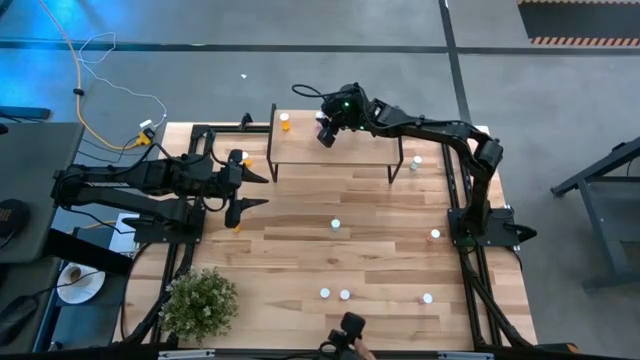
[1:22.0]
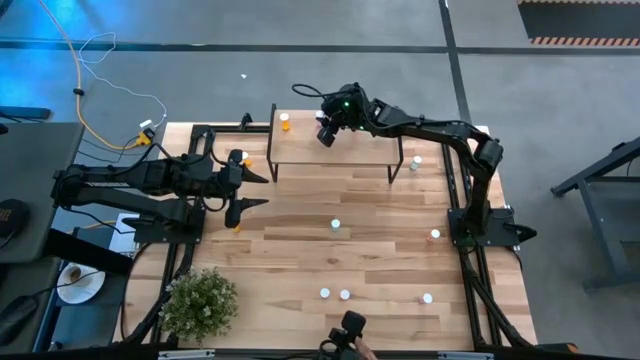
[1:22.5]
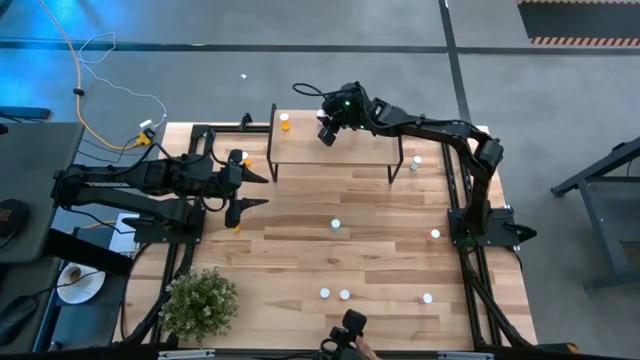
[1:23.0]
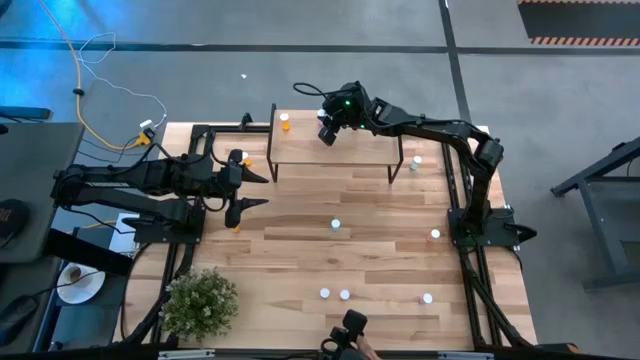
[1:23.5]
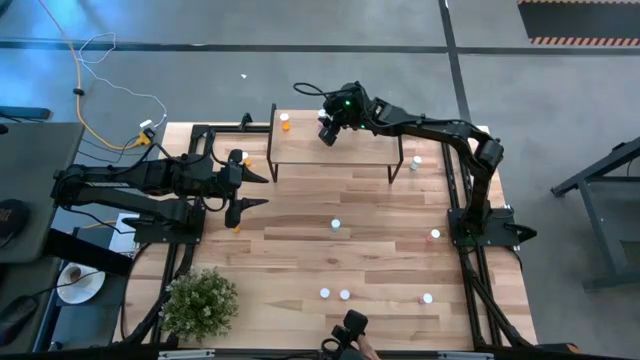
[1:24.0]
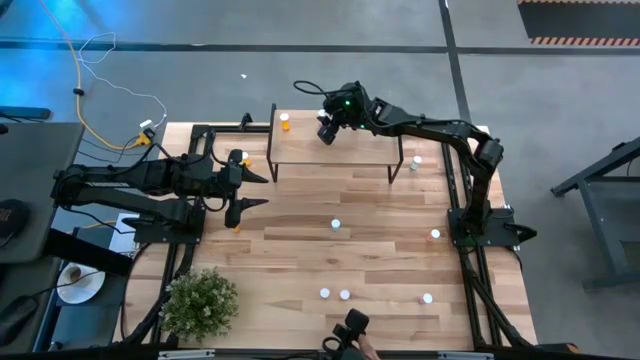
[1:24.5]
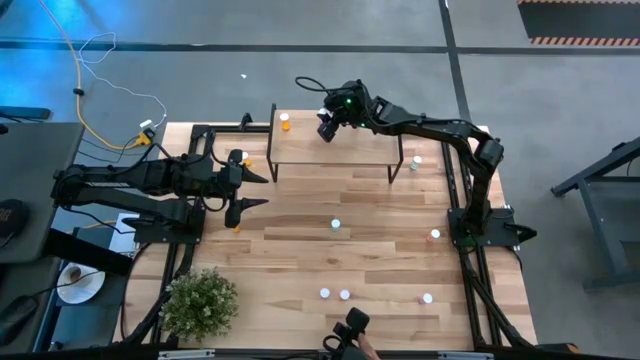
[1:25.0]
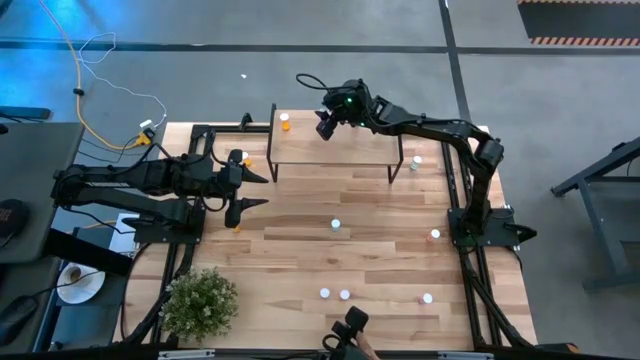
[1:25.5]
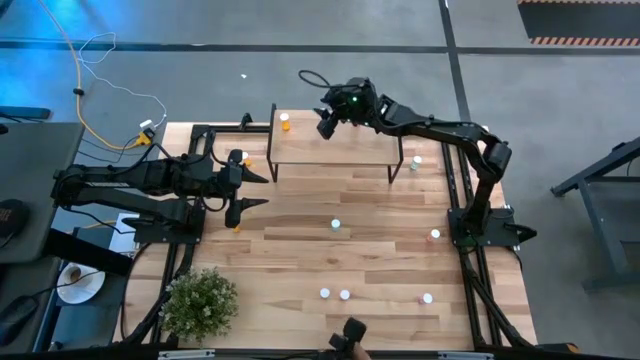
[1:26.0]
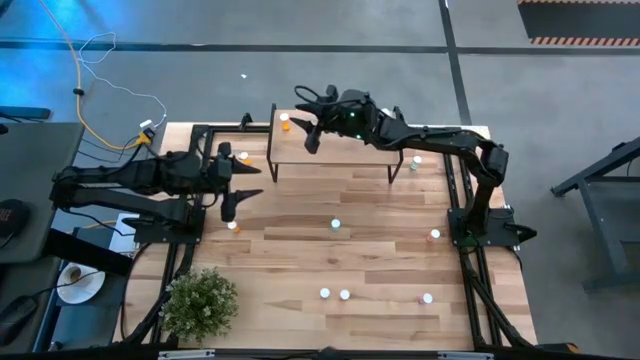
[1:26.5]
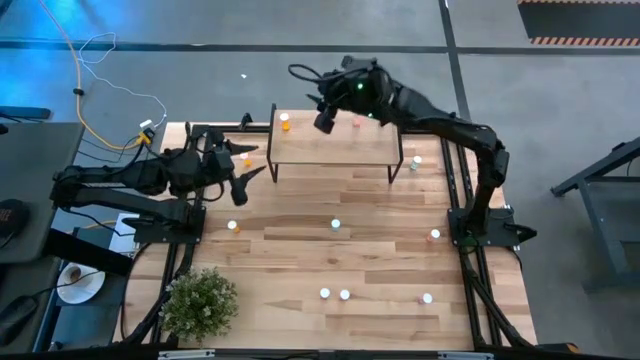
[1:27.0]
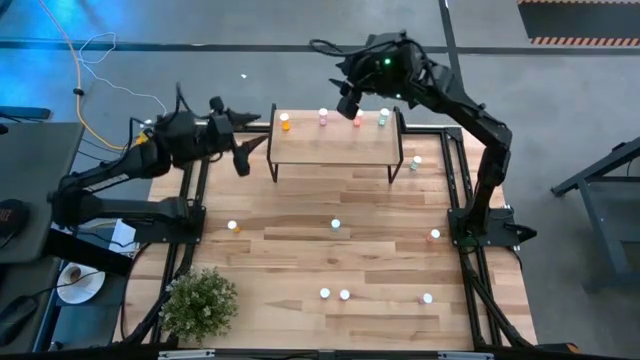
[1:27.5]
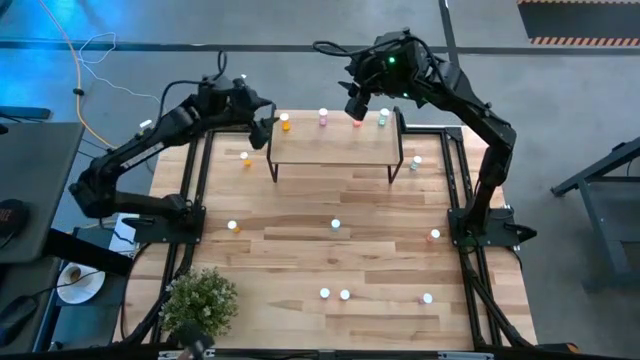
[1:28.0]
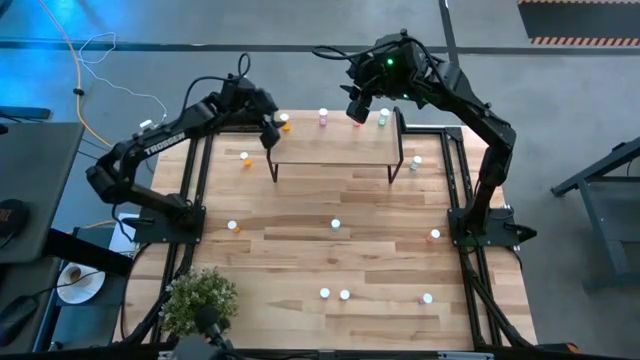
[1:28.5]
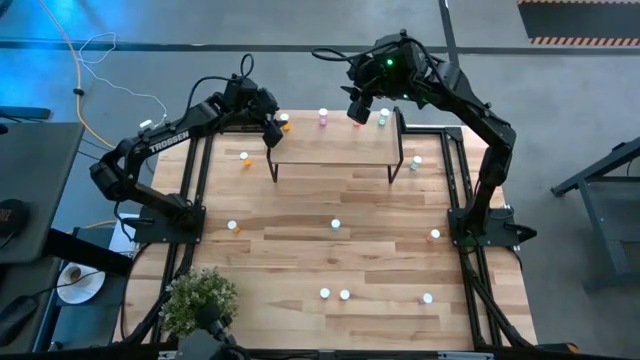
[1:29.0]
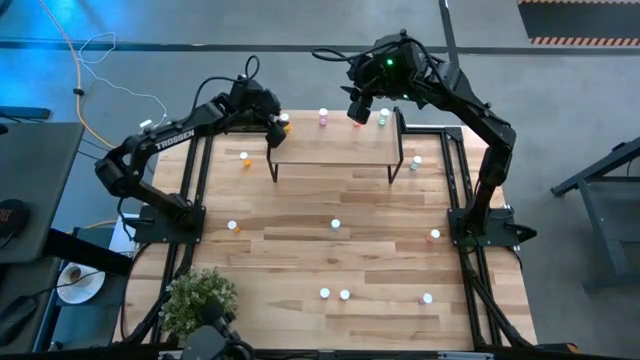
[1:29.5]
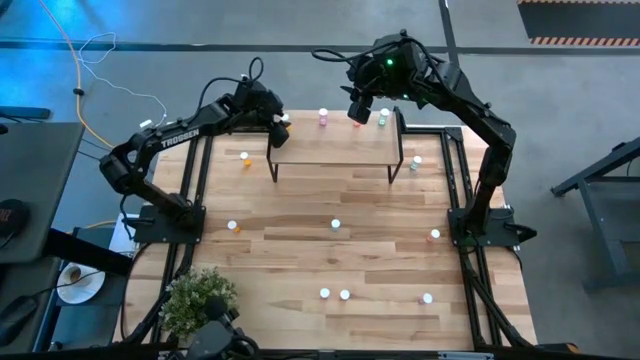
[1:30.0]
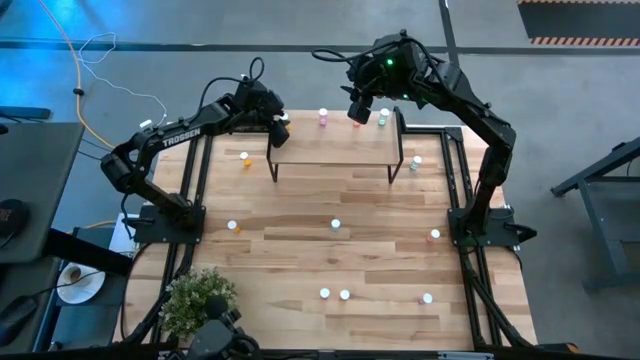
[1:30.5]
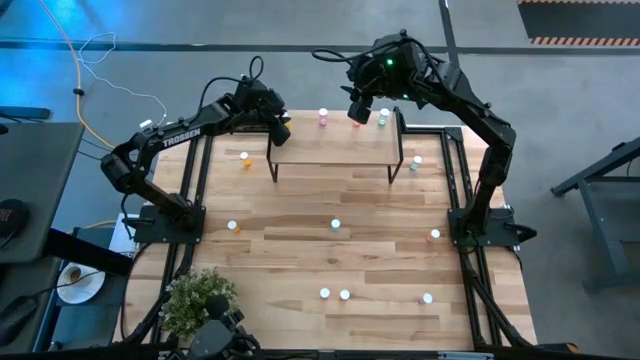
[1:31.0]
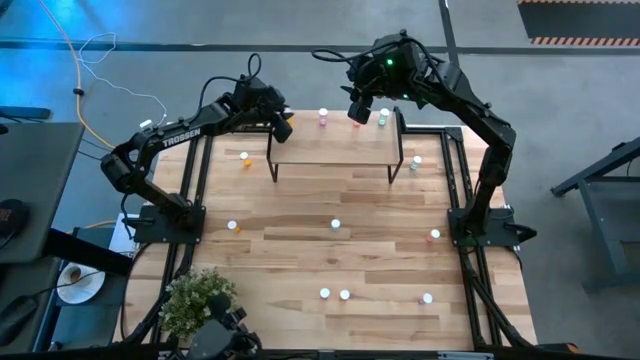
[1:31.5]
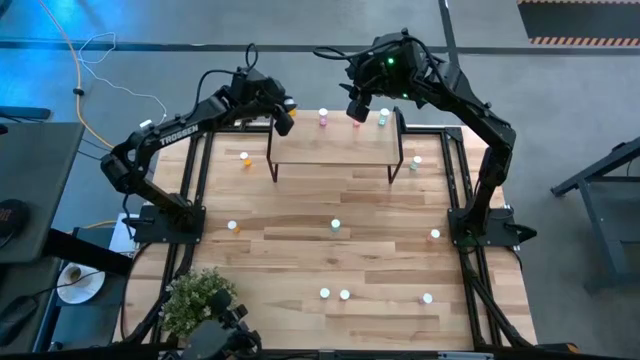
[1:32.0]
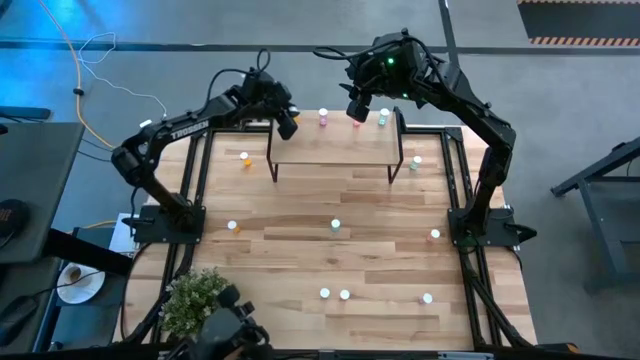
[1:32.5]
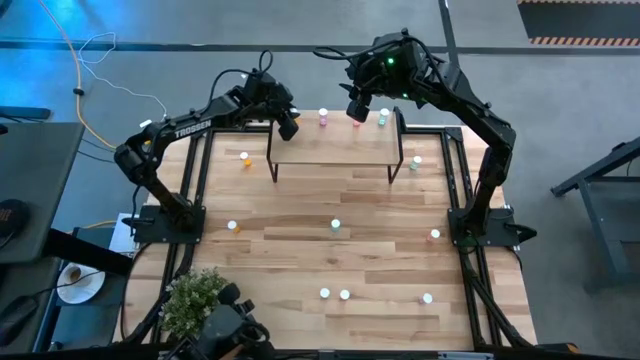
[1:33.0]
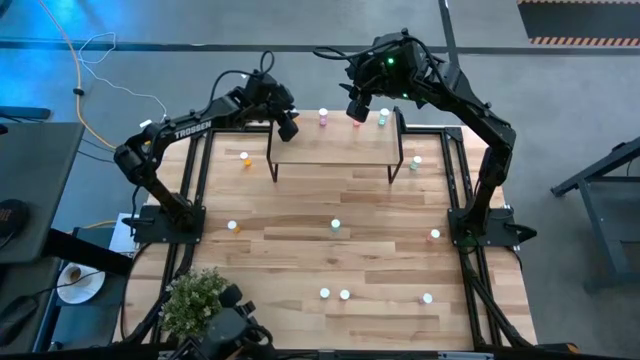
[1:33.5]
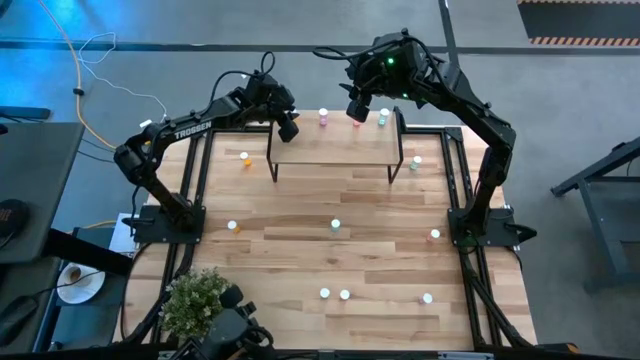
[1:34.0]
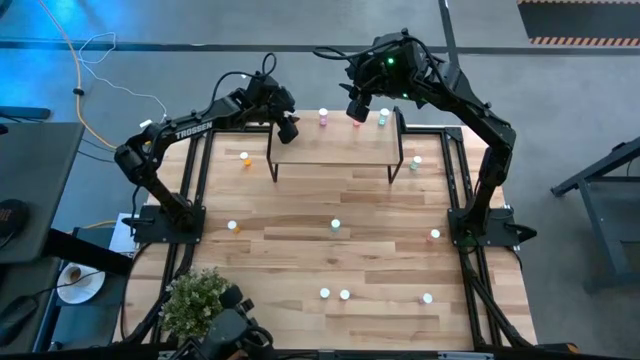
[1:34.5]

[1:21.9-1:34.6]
Task: Pick and place medicine bottles onto shelf by color
Adjust the pill bottles on the shelf

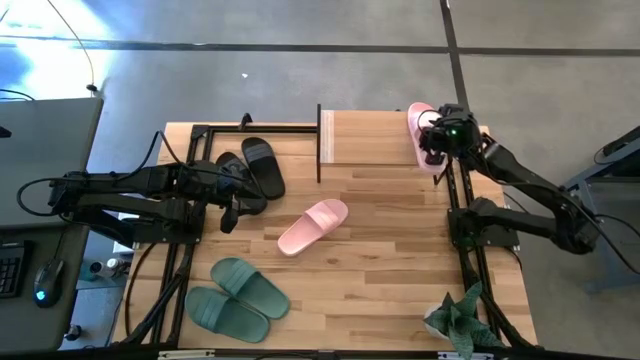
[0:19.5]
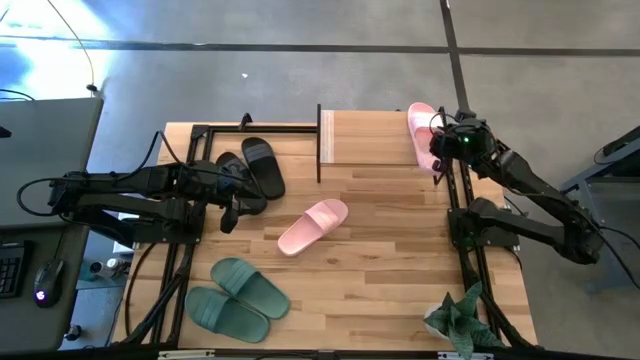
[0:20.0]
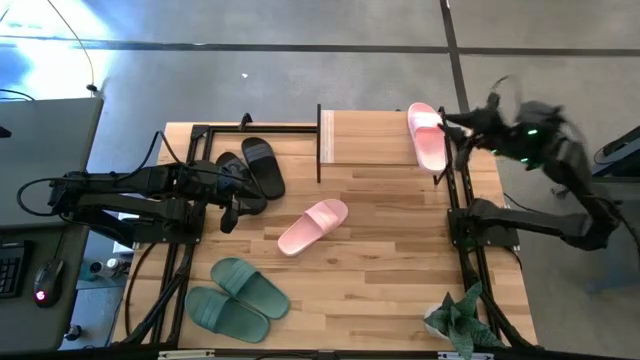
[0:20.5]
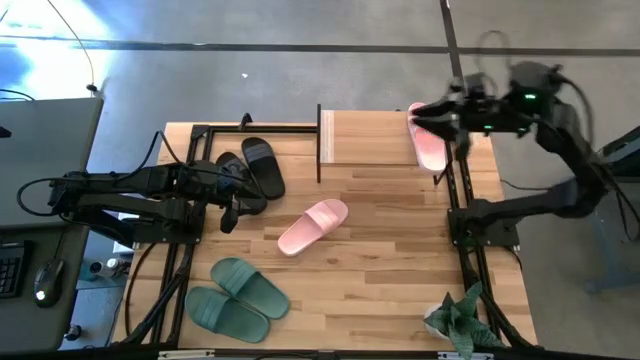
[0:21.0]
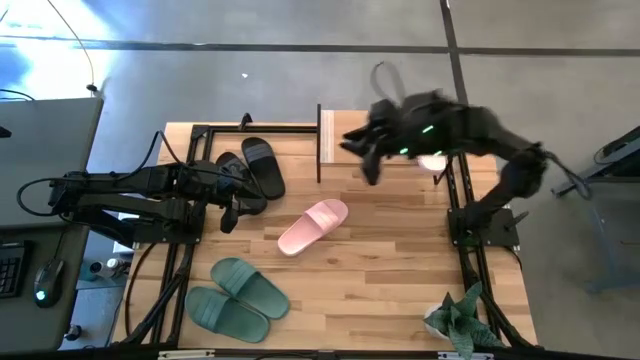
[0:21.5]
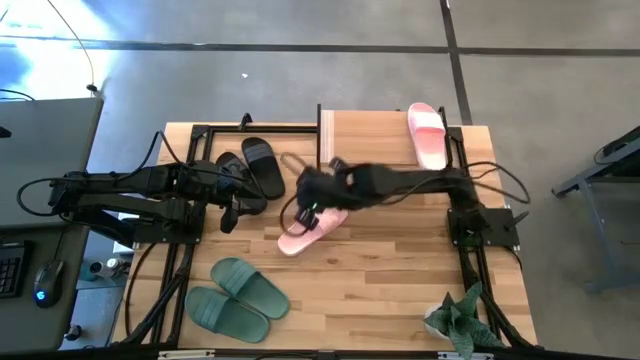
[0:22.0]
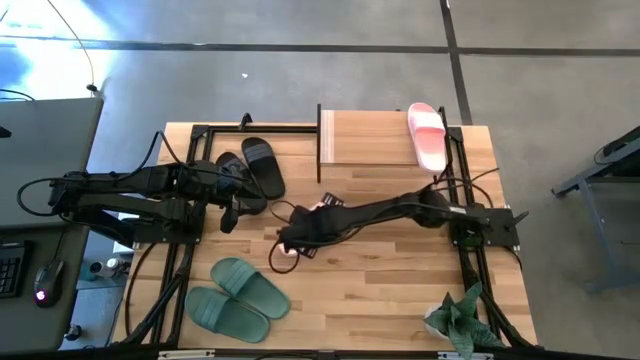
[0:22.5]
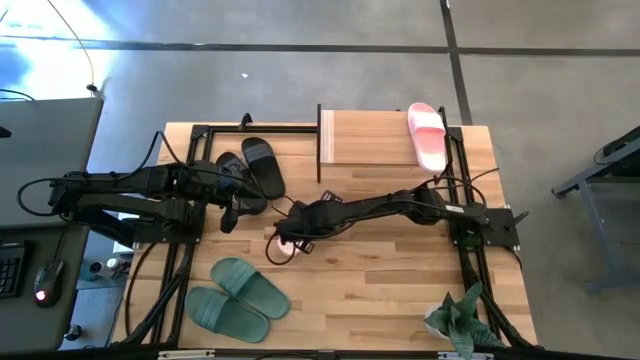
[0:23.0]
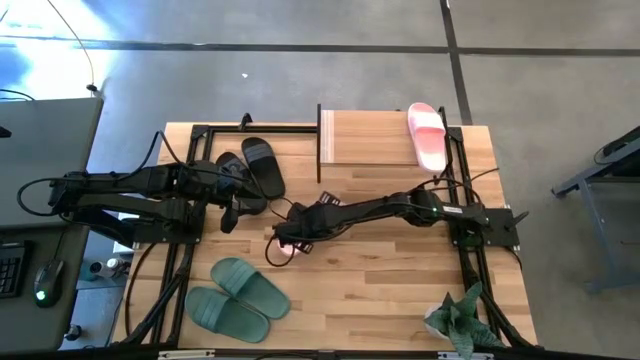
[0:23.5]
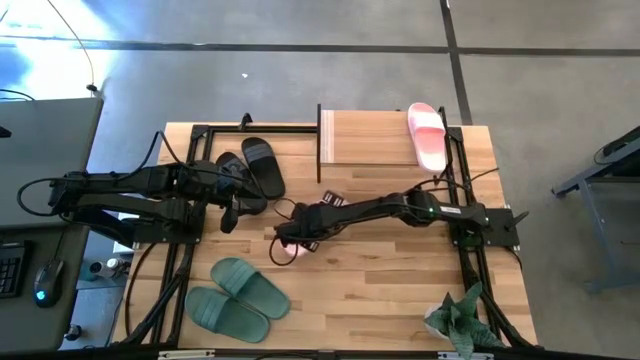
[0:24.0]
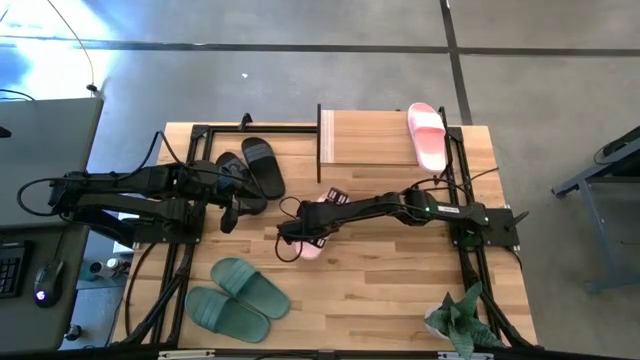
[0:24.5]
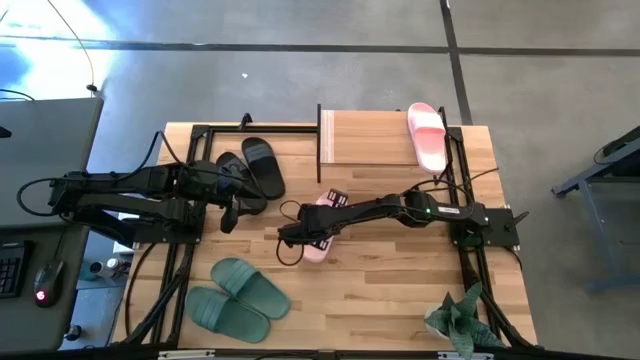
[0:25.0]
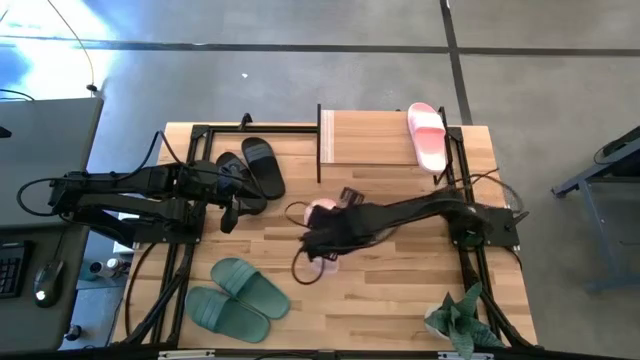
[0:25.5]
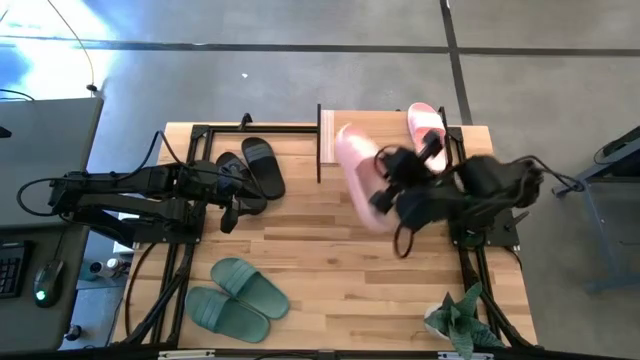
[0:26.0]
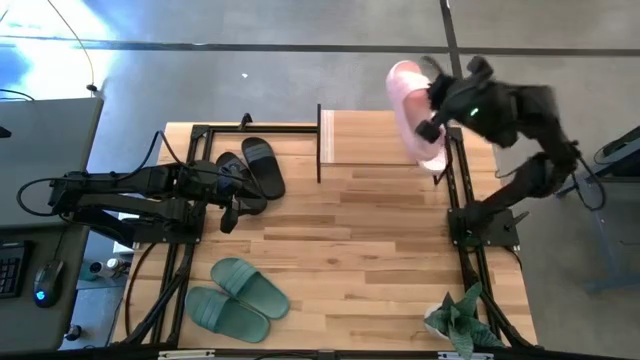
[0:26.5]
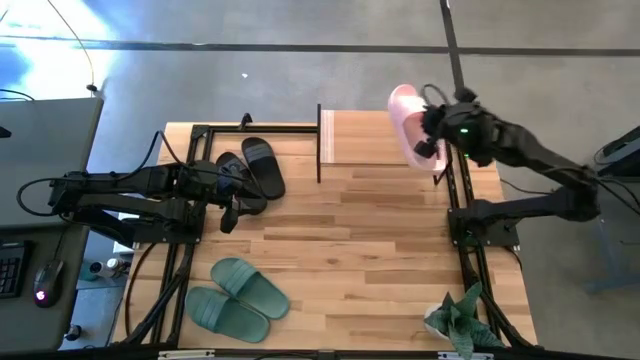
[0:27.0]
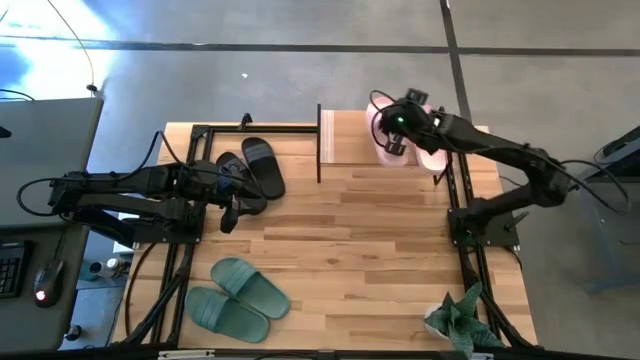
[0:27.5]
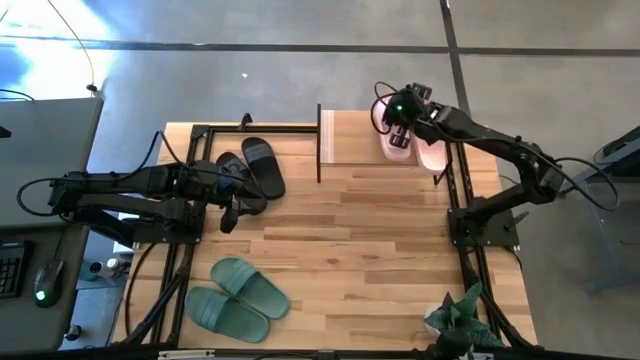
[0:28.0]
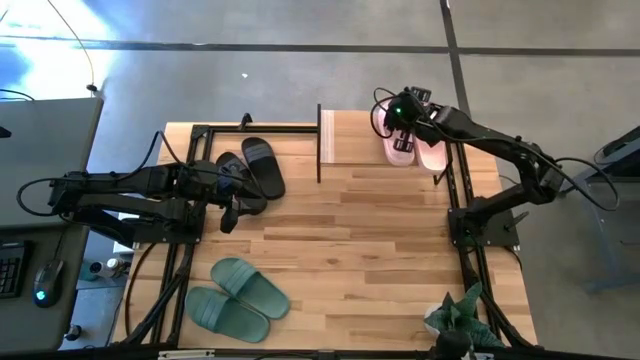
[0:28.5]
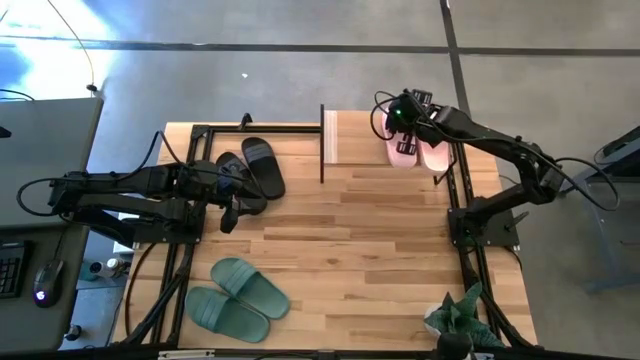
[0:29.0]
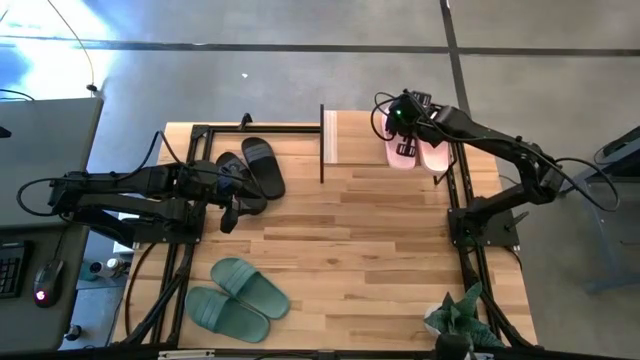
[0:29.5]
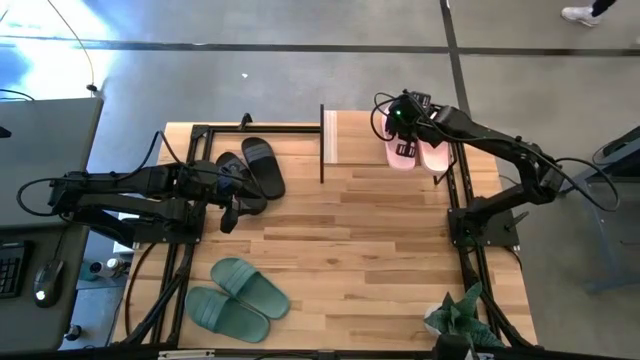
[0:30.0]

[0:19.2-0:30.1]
Task: Pick and place slides into the shelf
Put the pink slide on the shelf
